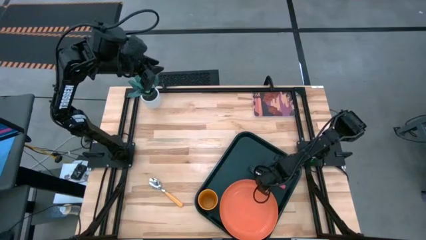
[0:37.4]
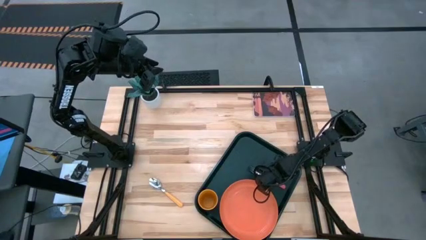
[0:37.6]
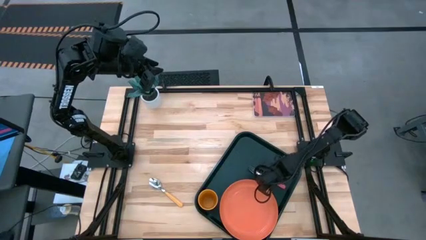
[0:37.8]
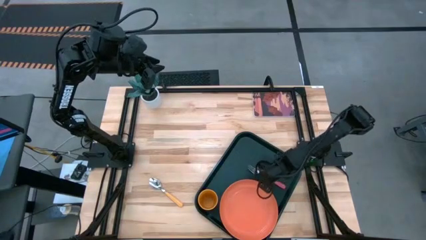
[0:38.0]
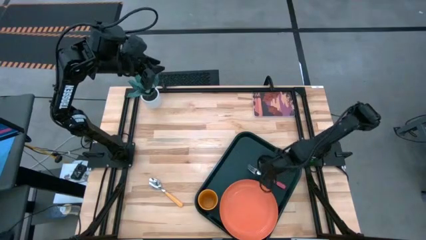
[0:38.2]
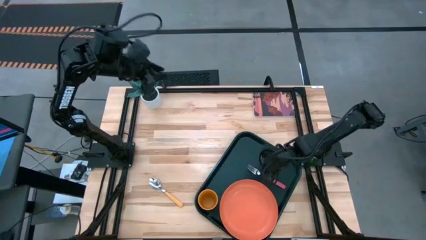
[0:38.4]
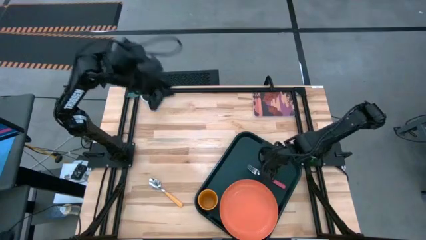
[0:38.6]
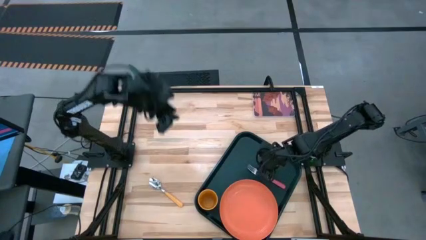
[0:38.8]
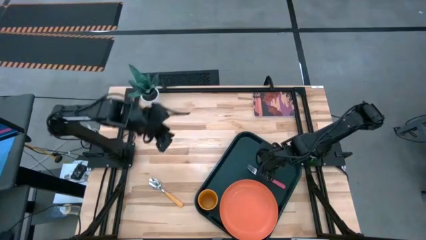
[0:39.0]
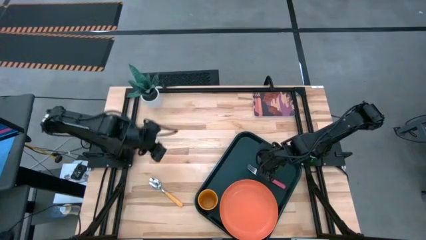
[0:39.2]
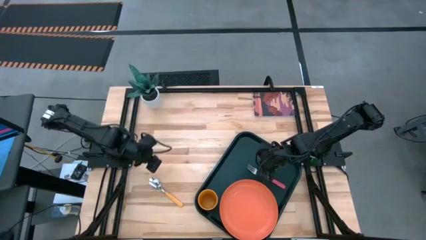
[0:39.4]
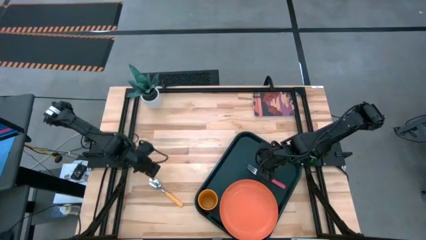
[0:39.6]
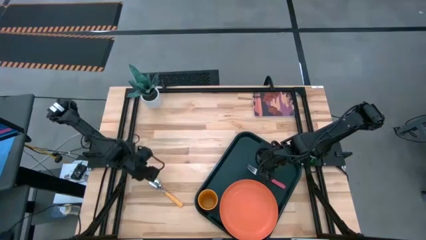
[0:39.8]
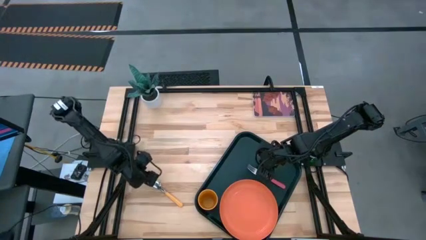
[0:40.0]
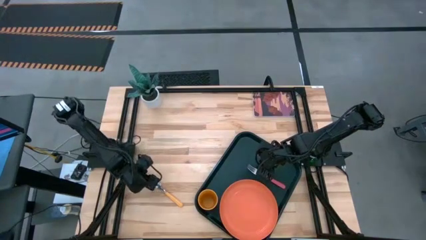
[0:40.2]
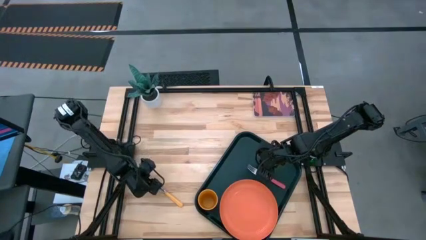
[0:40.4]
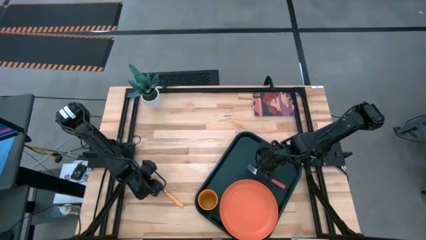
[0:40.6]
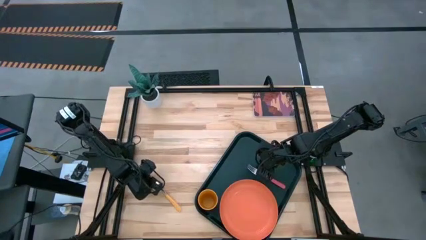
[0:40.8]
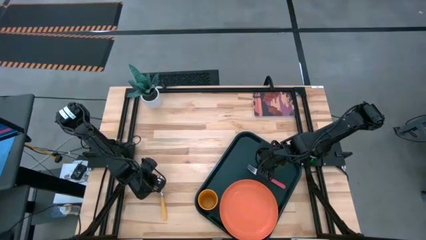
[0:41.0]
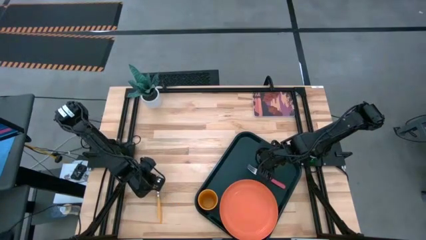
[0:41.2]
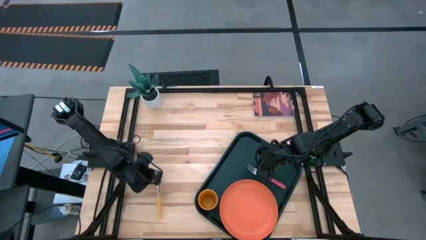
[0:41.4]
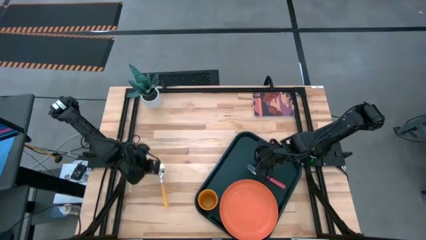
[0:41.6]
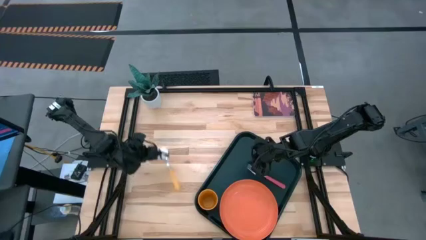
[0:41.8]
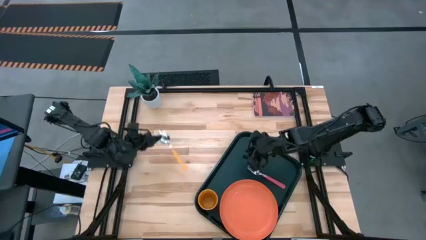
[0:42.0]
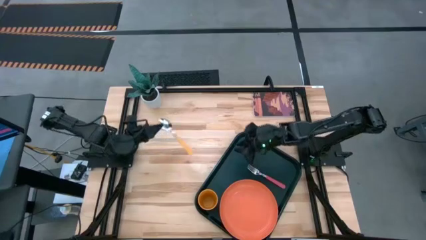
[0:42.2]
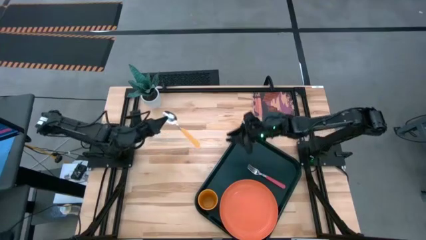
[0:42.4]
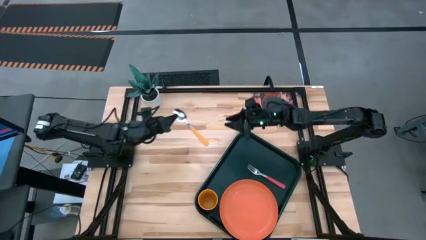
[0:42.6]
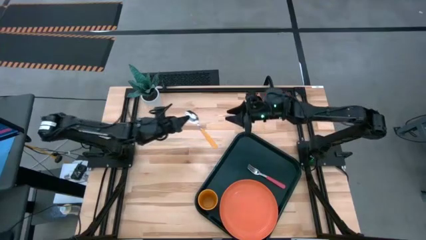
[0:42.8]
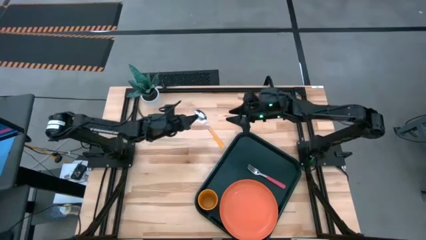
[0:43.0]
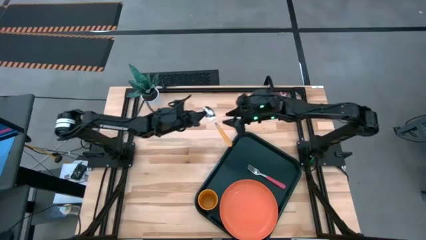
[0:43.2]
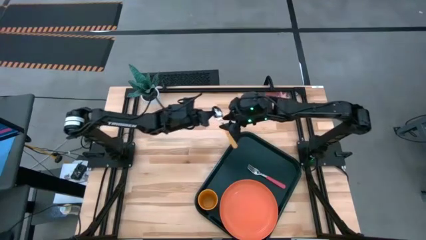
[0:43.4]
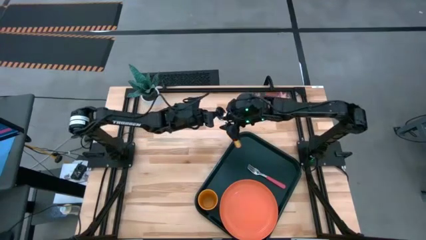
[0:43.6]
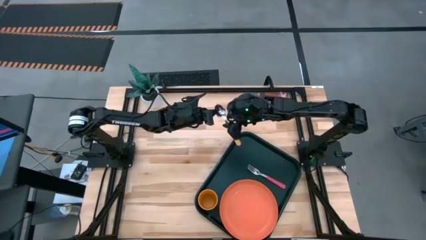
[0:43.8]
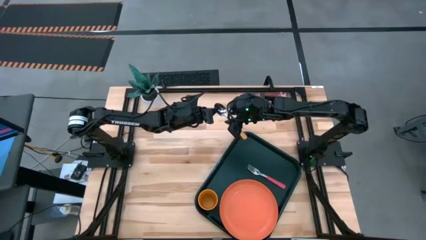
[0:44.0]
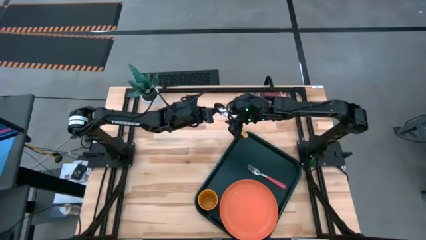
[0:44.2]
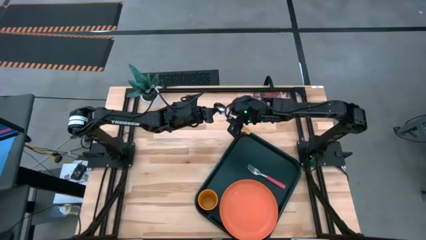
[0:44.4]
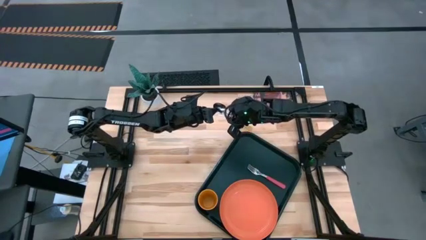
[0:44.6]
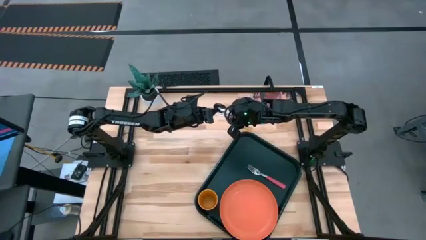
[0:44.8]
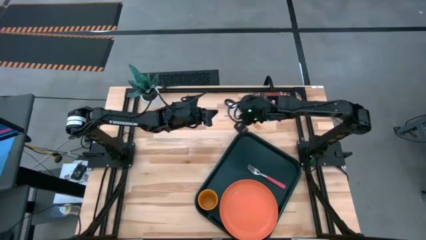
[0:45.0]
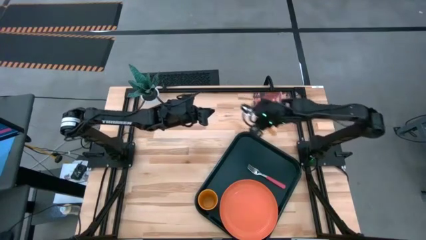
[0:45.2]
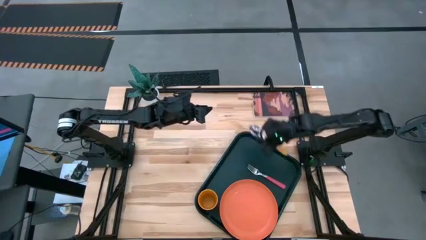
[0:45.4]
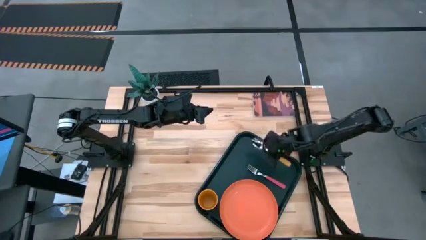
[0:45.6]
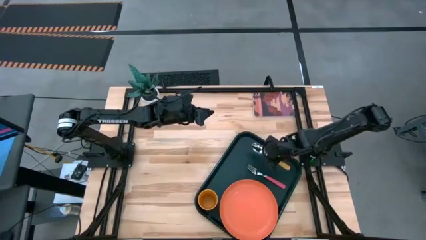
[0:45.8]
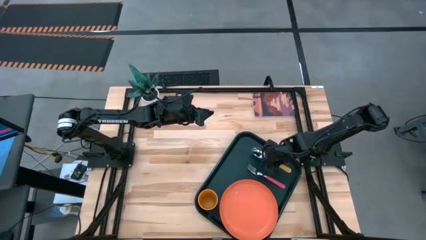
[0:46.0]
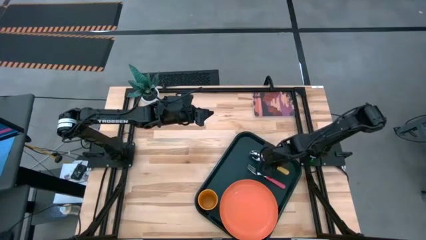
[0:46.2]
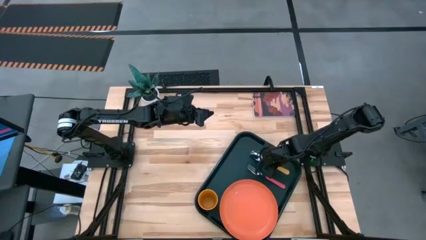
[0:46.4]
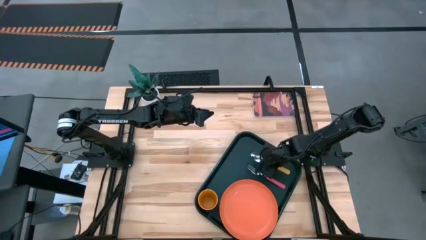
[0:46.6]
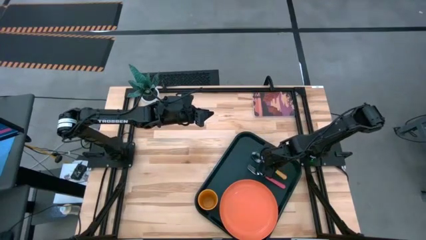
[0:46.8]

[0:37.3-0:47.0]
Task: Pick and place plate/cup/fork/spoon on tray
Put the yellow spoon on the black serving tray at the top of the pink fork

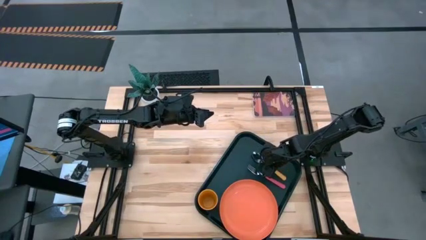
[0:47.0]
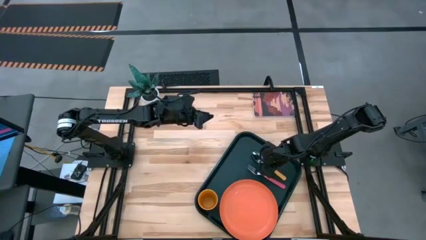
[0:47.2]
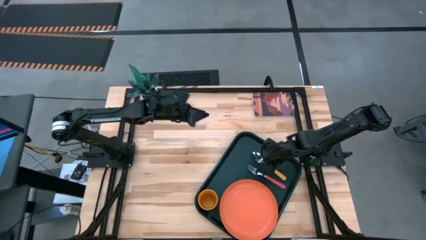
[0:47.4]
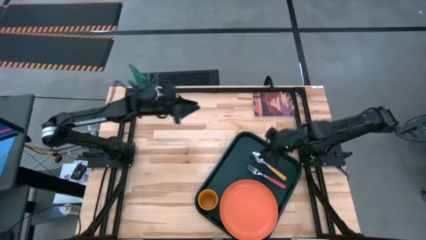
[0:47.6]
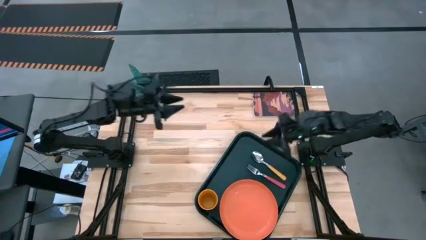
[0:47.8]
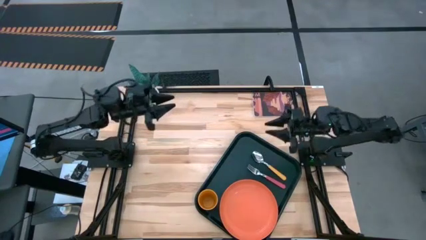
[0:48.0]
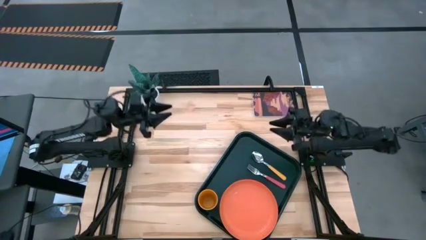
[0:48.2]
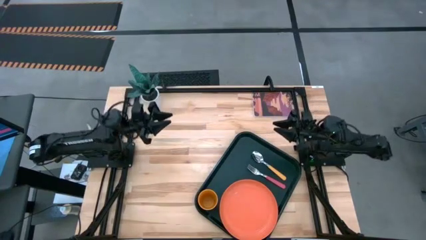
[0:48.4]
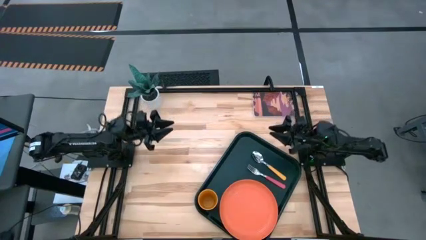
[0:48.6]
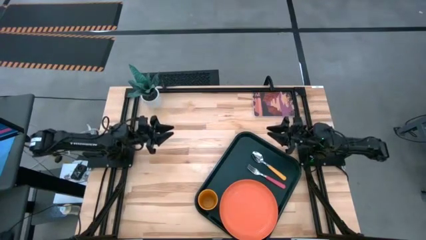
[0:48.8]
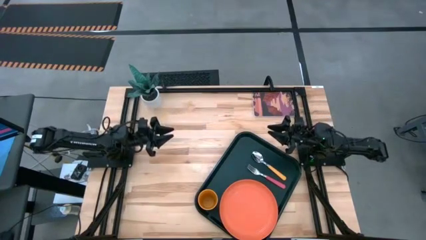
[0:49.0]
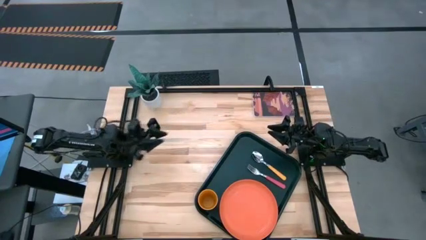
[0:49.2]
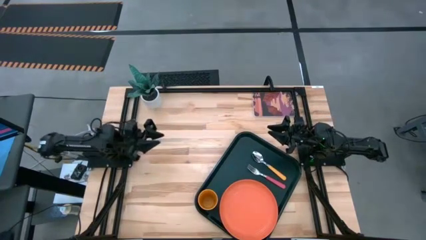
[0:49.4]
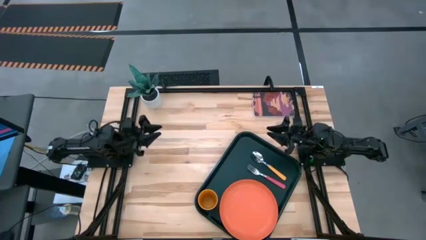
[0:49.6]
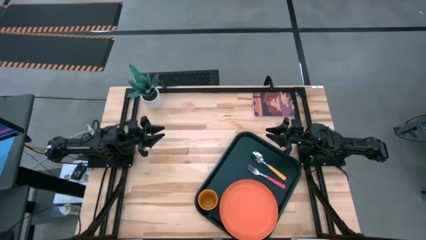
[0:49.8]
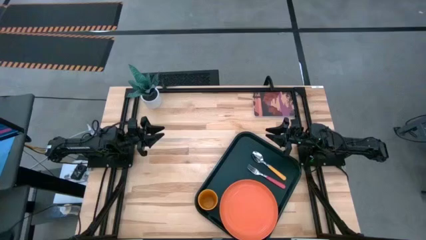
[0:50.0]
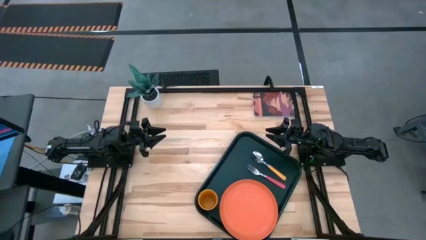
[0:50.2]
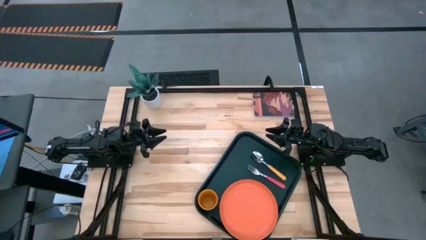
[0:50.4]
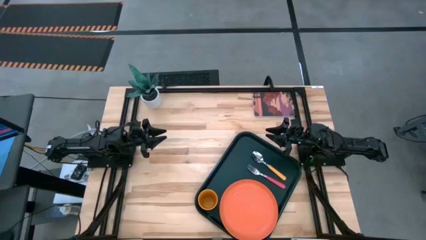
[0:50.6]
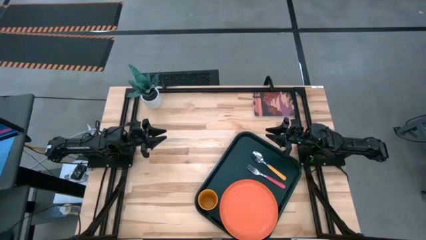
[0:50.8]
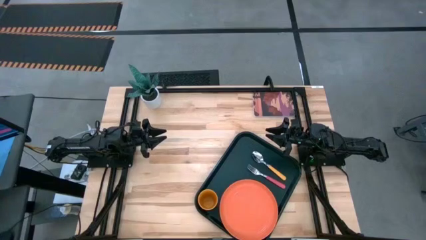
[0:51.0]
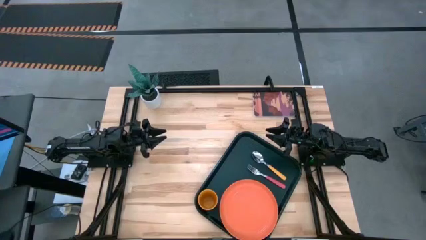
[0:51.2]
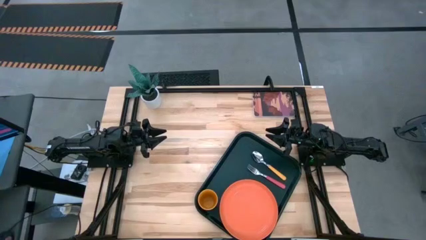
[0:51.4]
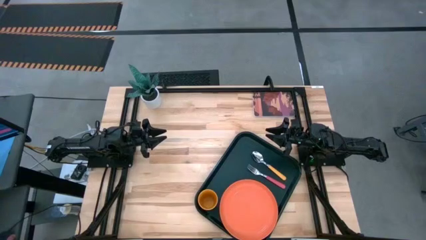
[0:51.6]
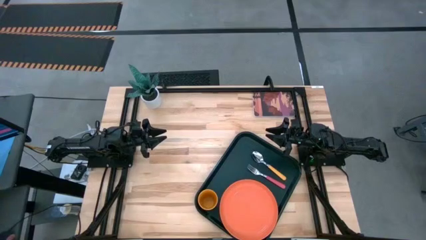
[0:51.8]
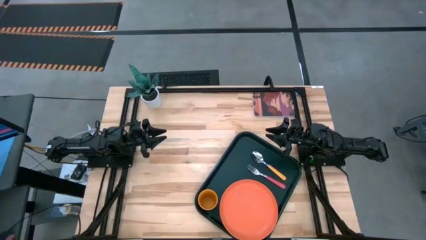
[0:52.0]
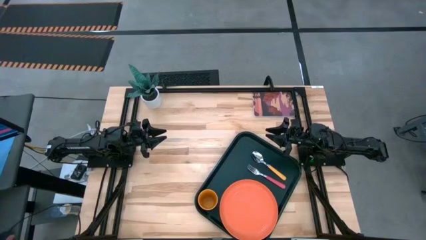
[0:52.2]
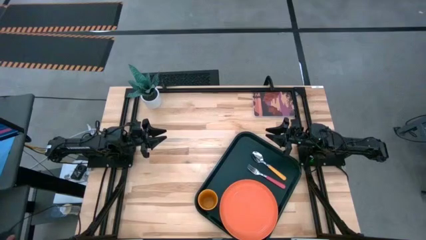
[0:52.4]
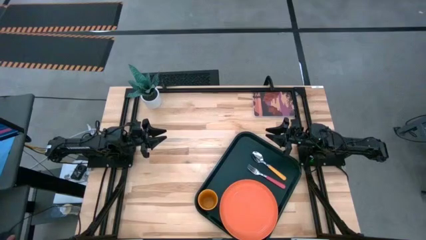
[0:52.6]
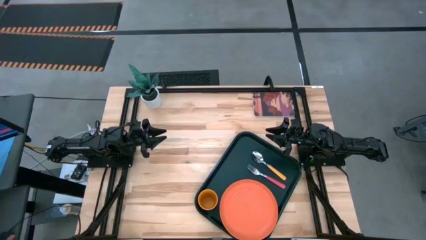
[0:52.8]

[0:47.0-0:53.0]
Return to Home Position
